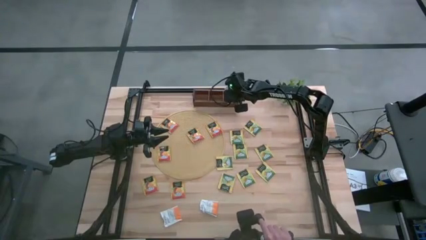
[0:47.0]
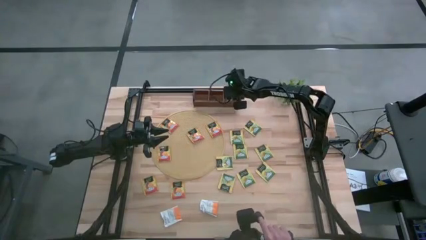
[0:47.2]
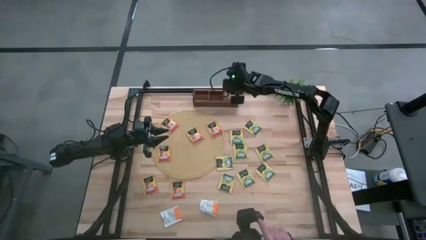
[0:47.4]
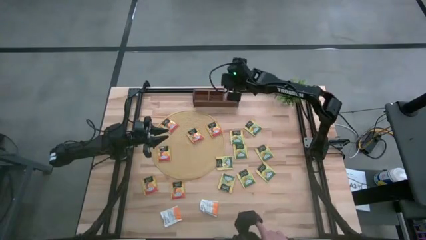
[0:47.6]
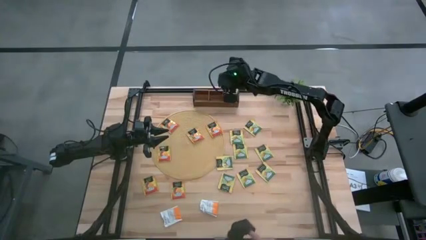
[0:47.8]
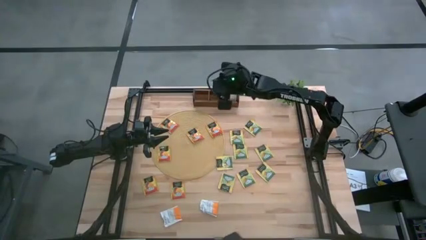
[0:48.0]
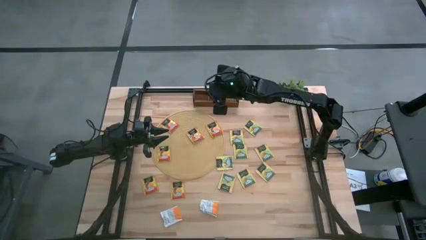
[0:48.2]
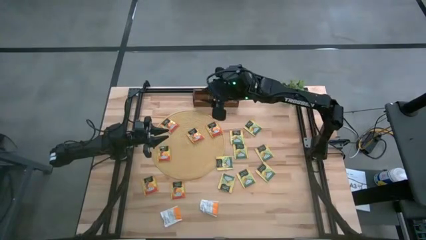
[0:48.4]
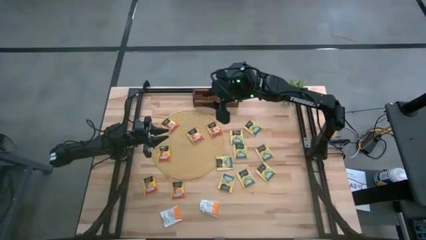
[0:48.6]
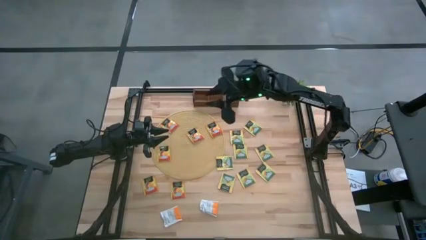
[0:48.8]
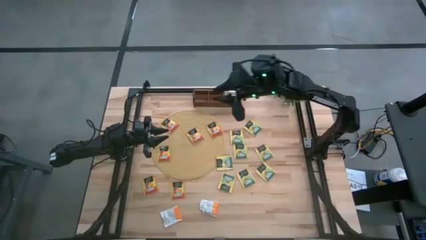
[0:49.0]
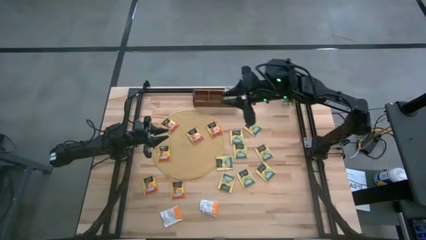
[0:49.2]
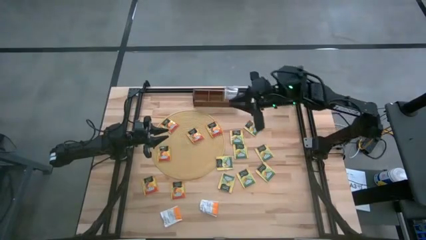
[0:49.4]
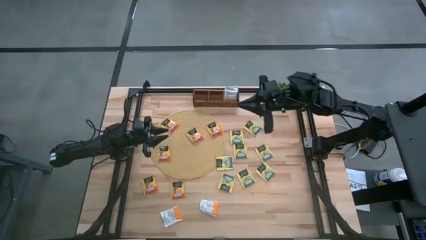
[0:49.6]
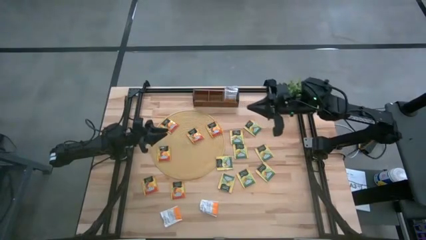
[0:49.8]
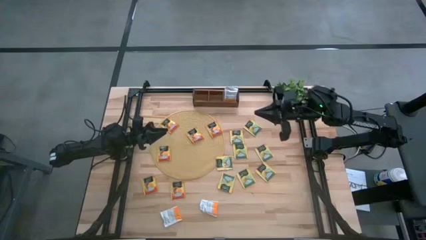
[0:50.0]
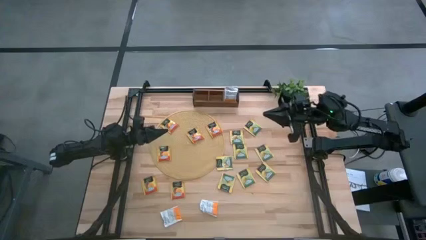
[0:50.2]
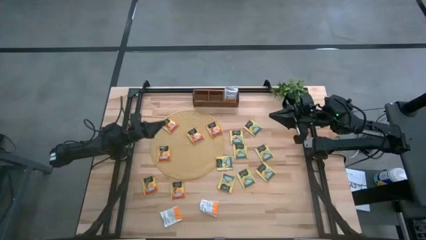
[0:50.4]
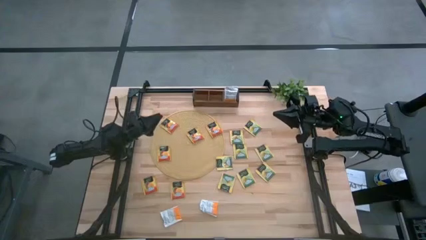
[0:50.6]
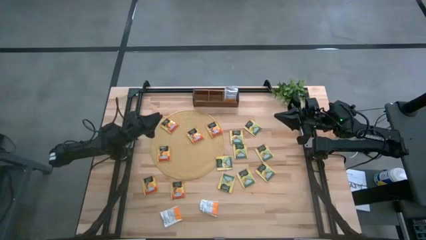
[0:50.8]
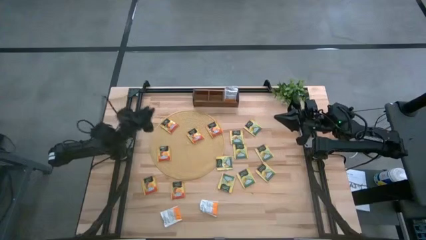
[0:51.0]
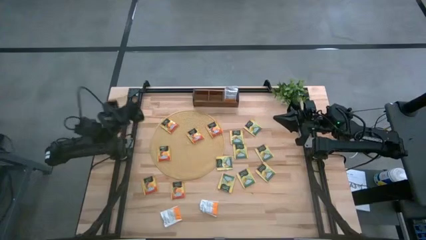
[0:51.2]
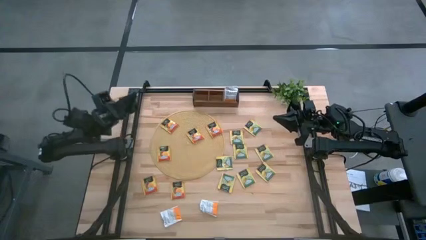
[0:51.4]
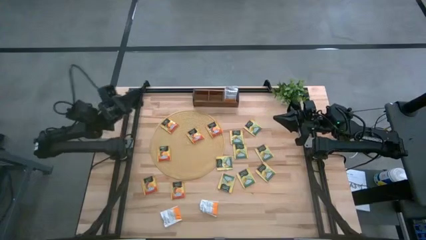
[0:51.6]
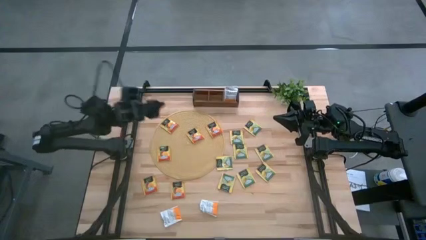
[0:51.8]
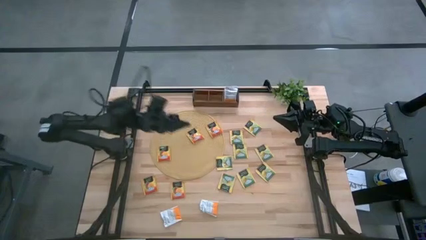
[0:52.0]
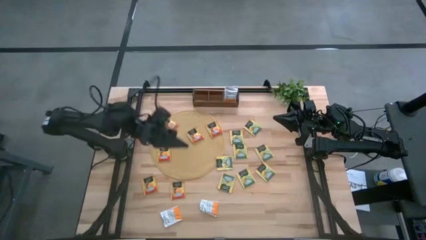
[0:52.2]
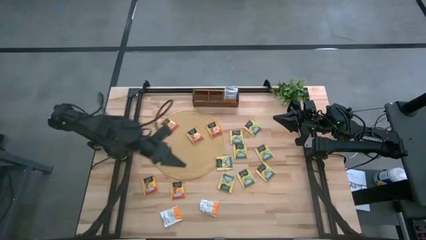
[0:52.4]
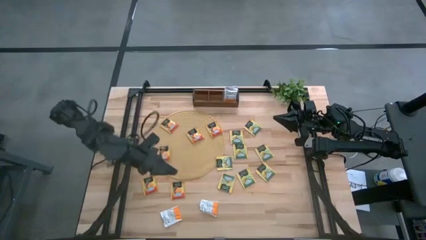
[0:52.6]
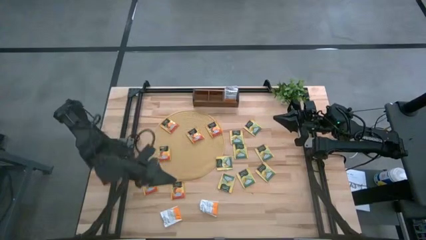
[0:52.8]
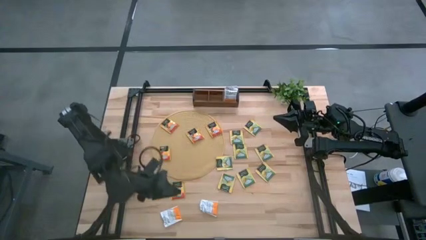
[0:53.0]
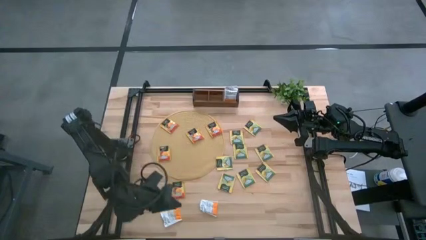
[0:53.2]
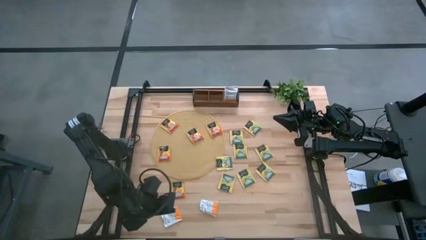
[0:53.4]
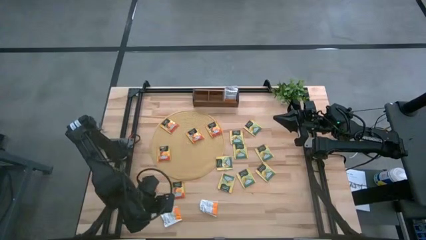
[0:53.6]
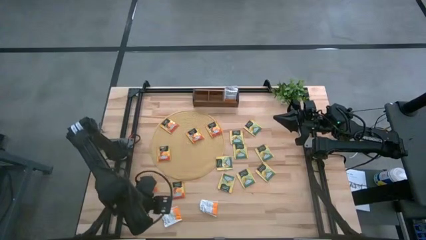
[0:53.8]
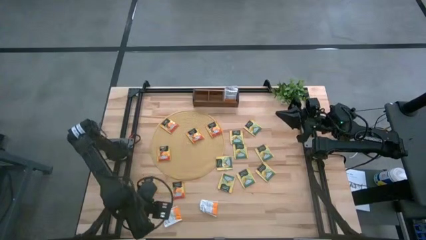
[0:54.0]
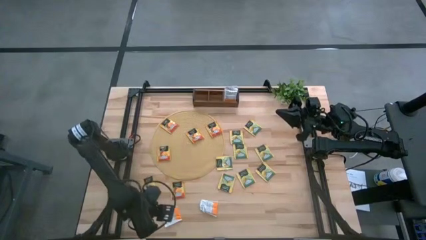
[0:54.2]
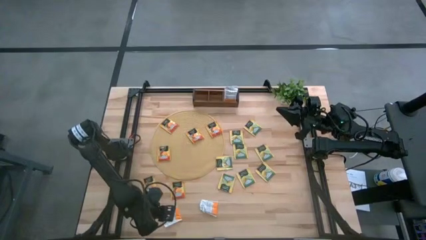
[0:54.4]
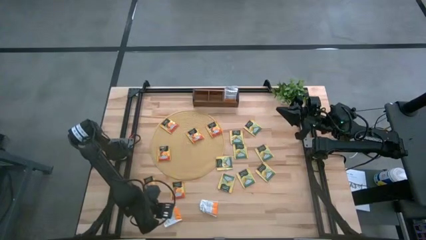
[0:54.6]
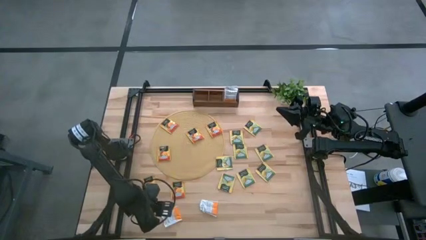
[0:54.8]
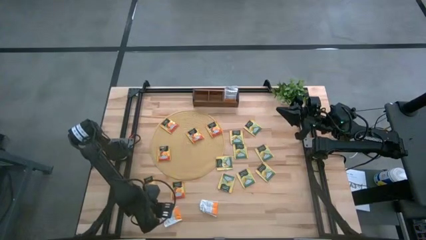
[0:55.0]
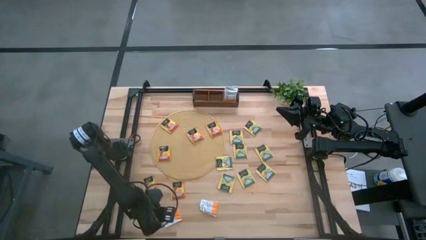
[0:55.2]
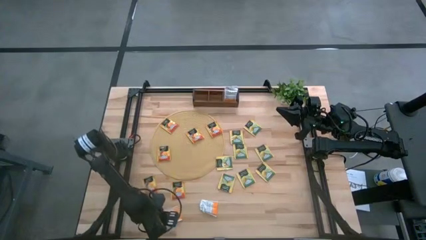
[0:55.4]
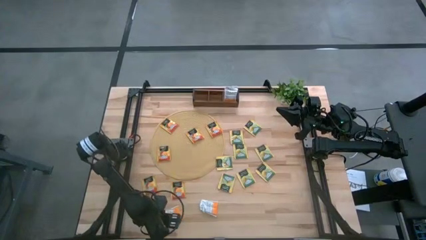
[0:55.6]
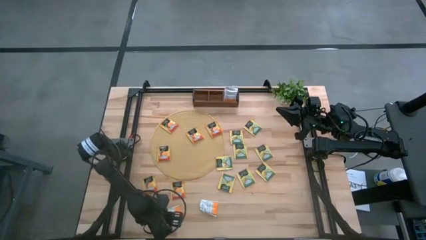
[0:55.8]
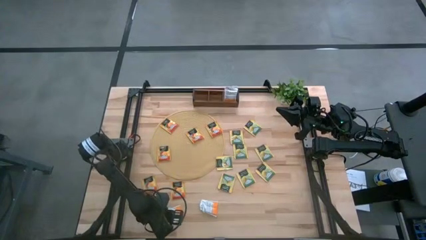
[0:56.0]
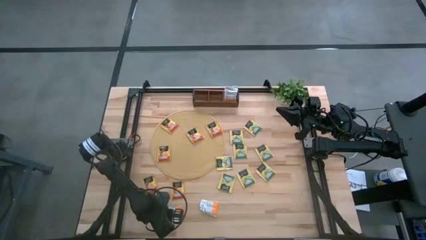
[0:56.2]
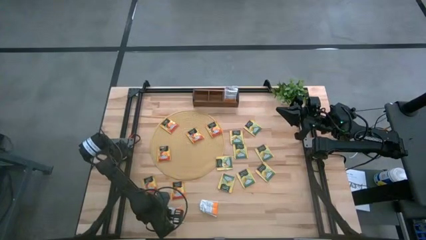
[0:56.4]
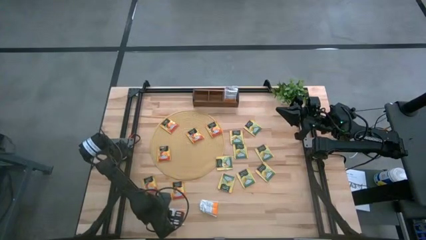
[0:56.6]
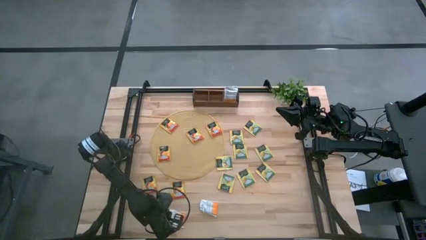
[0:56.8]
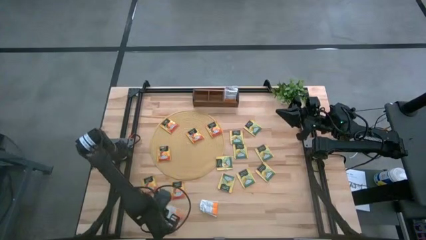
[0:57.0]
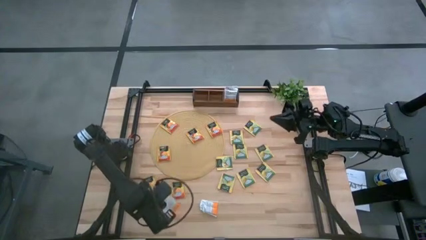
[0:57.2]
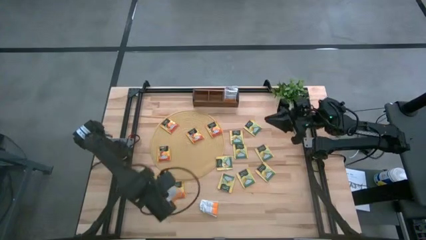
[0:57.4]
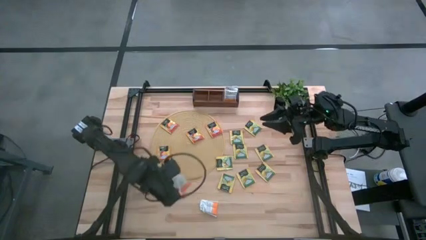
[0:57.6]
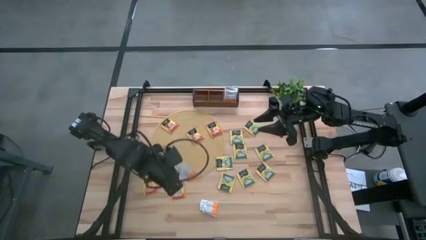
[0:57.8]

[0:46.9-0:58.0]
Task: Pick & Place Tea
Put the left white tea bag into the right section of the wooden organizer

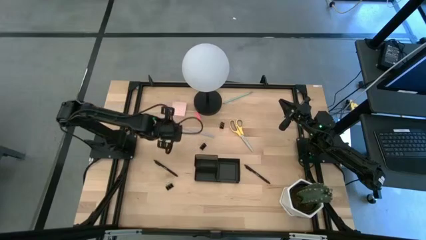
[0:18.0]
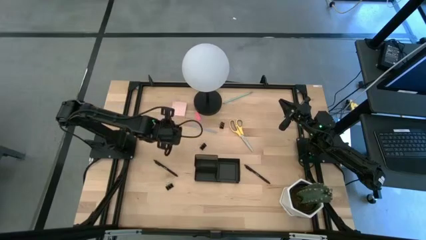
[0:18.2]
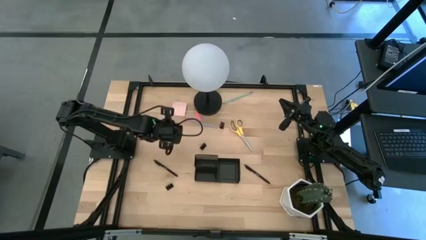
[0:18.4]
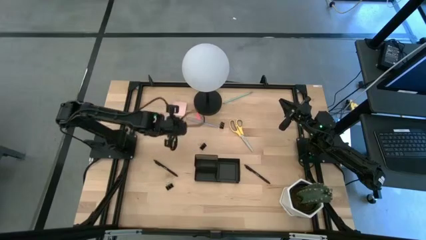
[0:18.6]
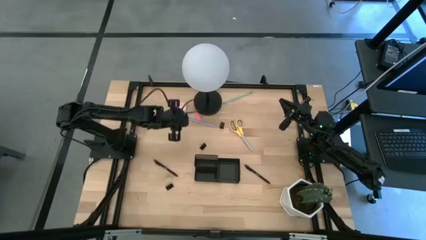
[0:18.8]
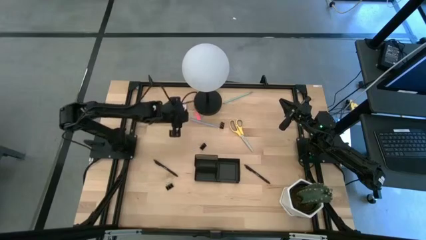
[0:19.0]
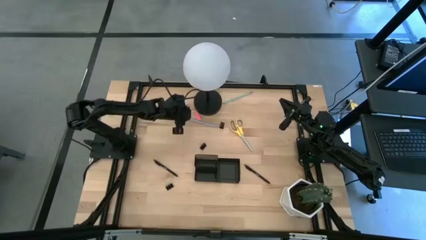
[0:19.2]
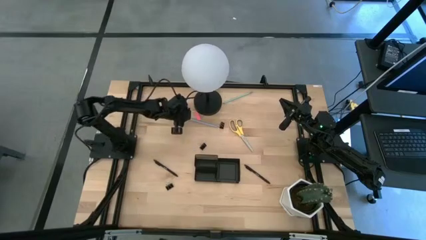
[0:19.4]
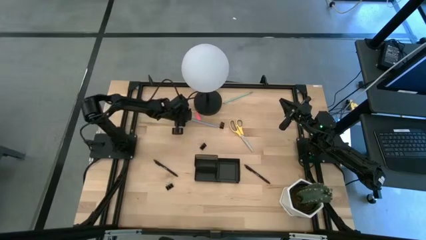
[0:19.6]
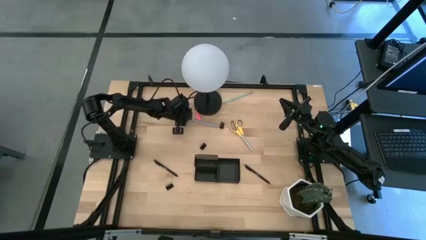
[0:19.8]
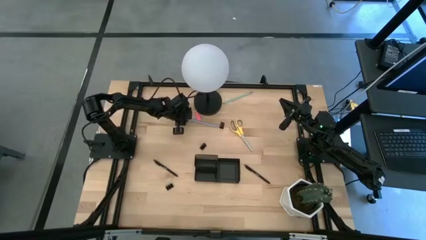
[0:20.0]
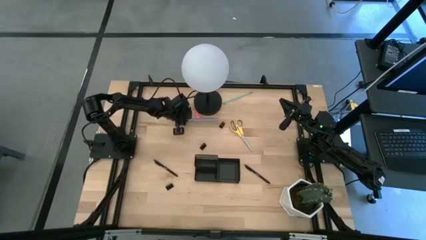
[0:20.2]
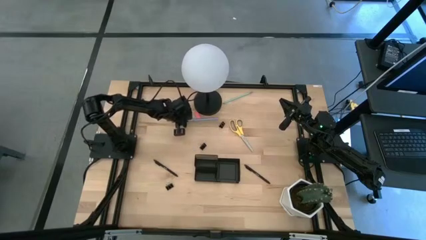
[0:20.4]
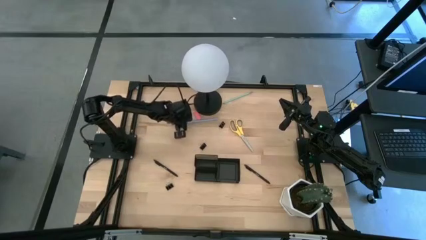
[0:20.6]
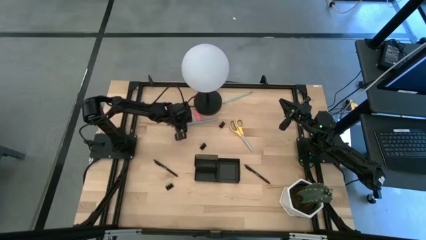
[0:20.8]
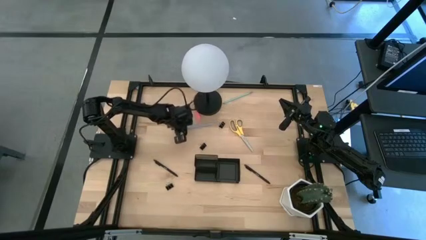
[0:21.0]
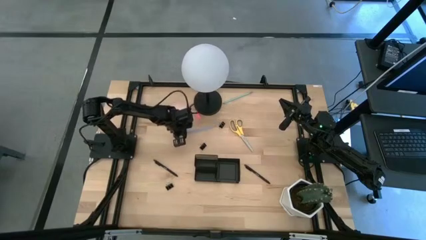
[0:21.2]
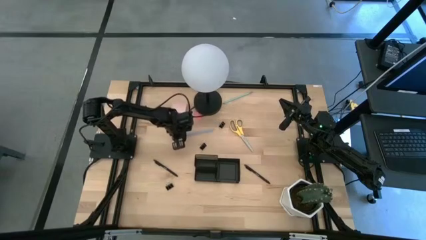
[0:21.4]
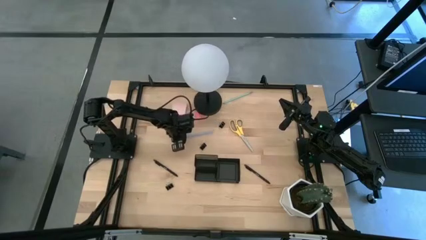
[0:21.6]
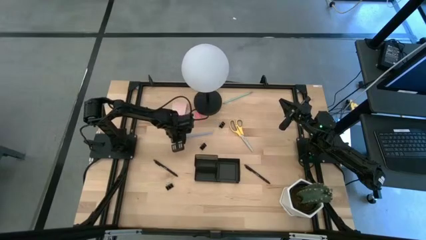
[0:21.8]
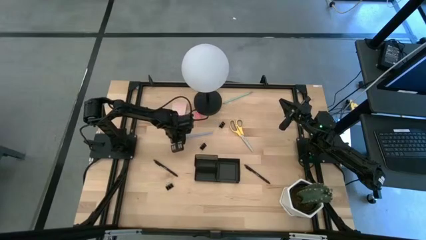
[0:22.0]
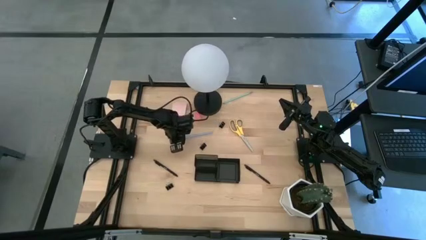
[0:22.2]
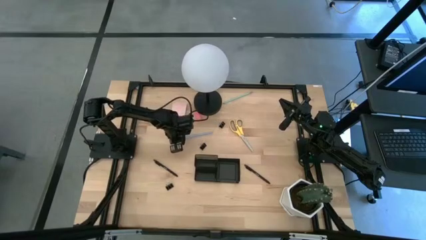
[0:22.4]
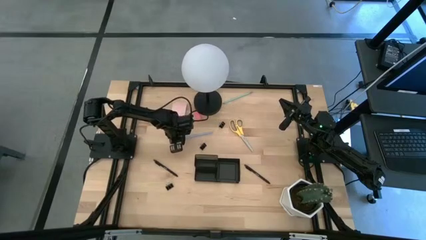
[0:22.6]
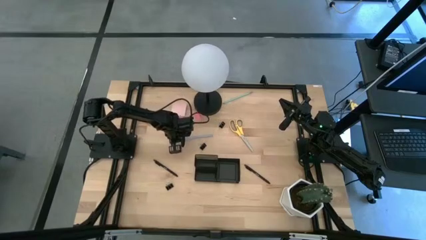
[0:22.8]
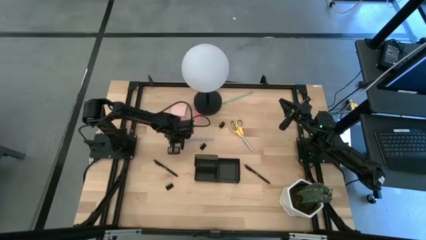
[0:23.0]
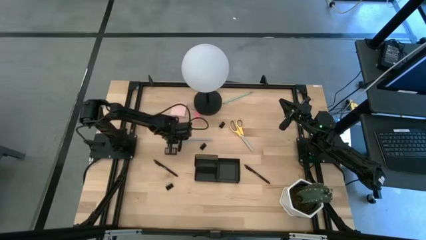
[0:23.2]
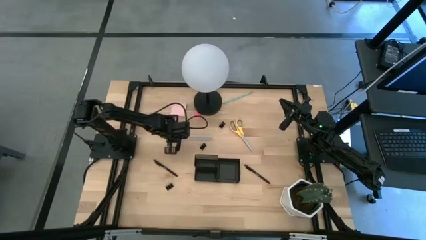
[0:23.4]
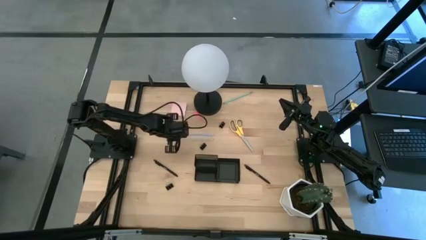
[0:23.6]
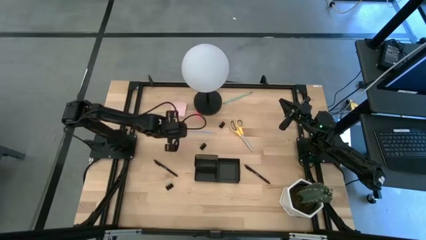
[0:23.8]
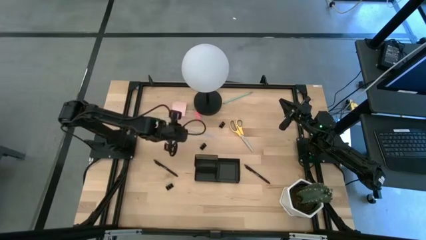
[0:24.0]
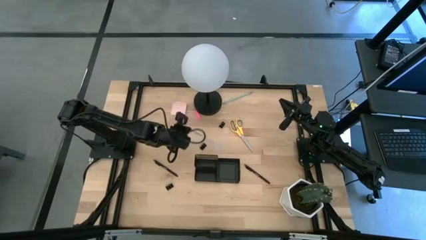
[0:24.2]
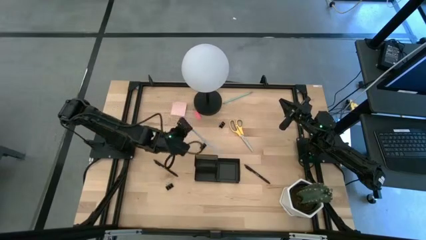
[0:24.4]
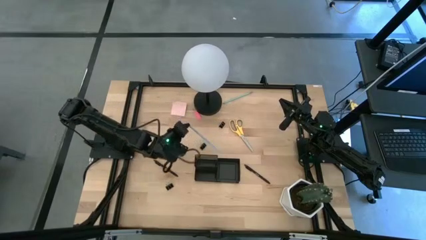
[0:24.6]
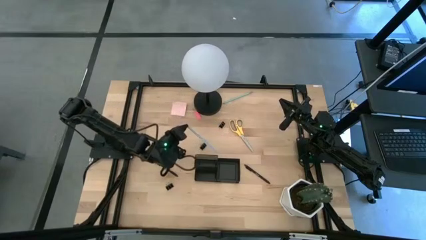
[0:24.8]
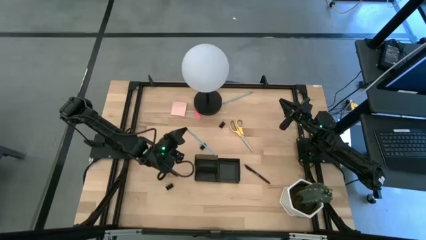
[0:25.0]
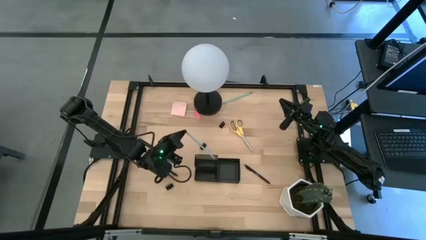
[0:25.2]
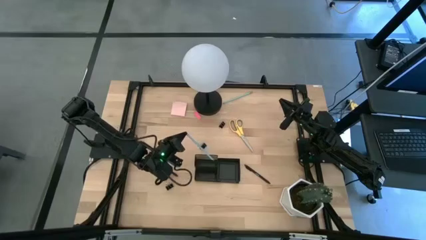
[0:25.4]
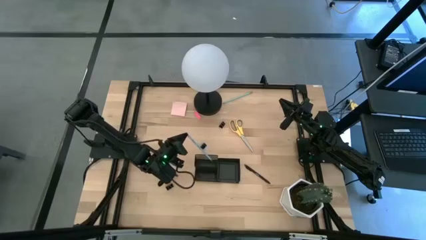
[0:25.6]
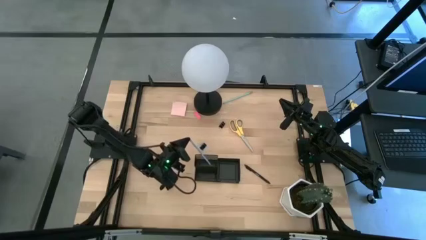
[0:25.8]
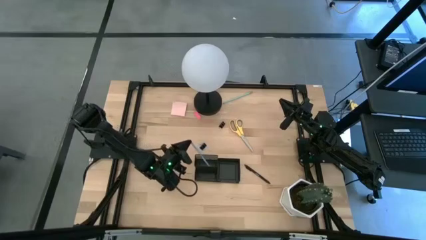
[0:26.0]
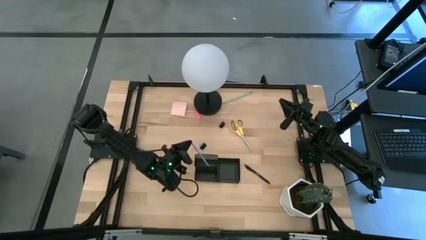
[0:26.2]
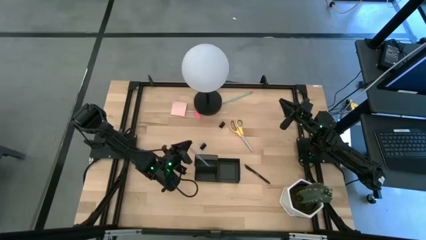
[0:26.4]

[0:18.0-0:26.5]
Task: Pick and place office supplies into organizer
Put the blue pencil into the black desk organizer
